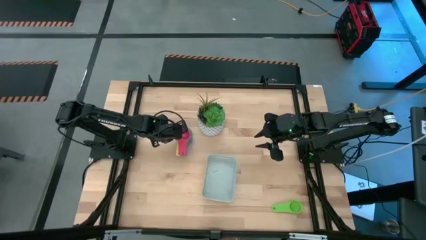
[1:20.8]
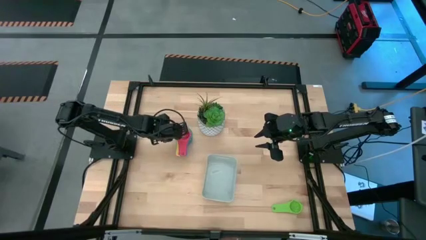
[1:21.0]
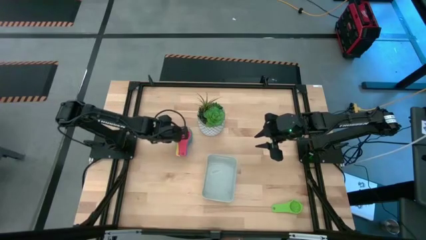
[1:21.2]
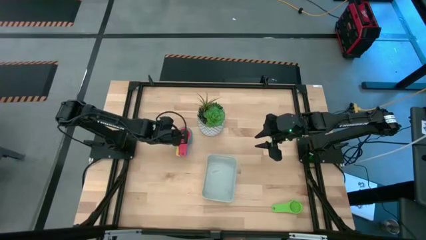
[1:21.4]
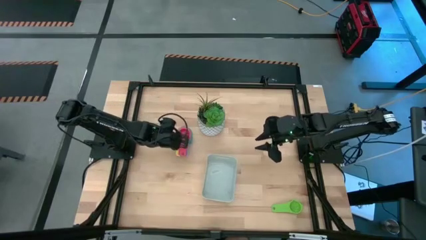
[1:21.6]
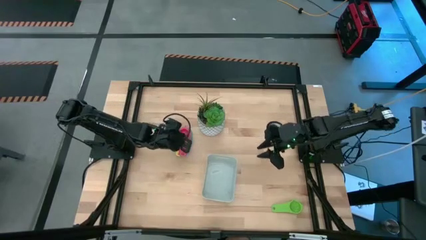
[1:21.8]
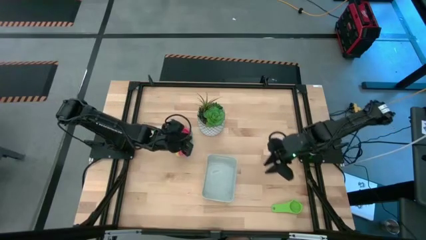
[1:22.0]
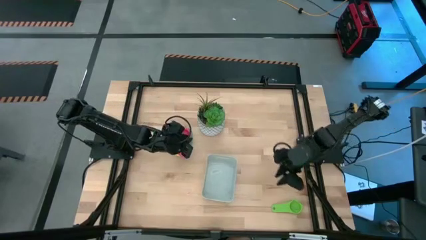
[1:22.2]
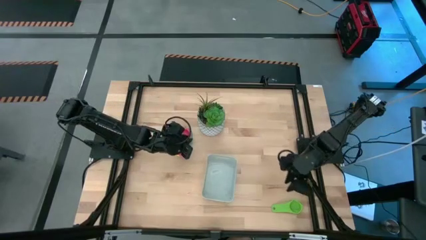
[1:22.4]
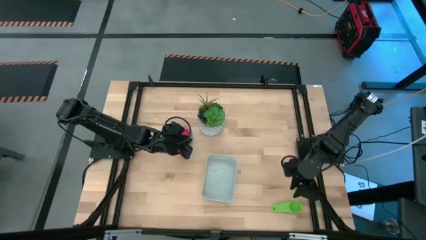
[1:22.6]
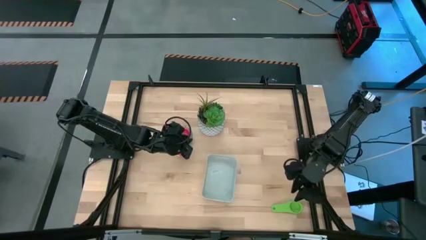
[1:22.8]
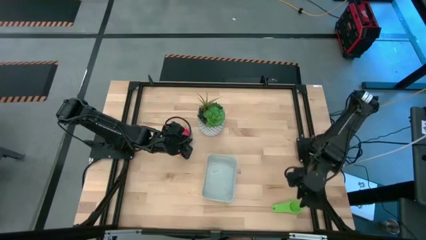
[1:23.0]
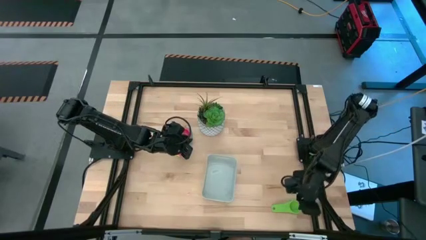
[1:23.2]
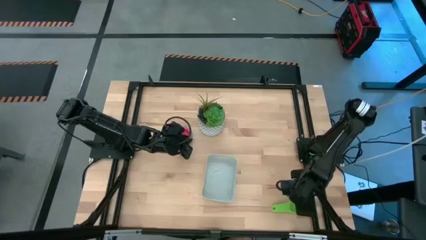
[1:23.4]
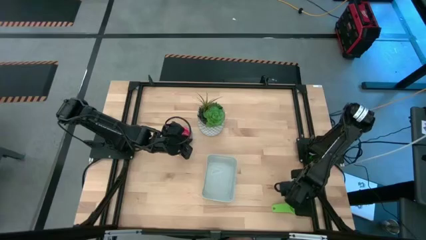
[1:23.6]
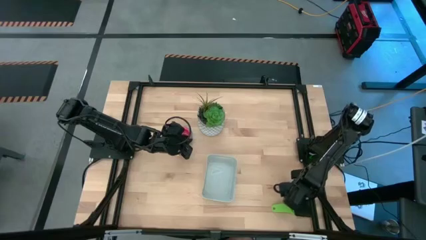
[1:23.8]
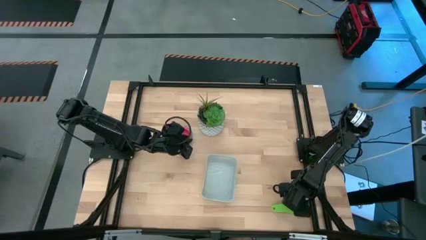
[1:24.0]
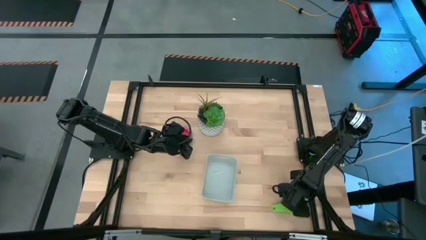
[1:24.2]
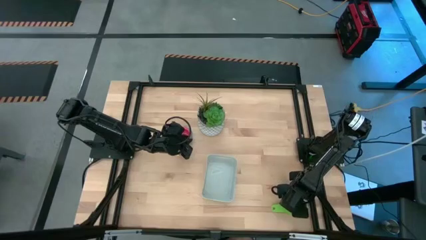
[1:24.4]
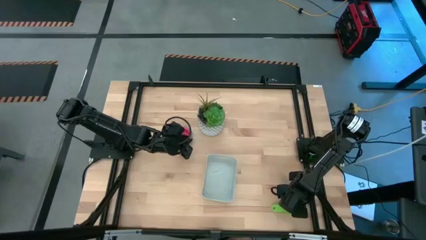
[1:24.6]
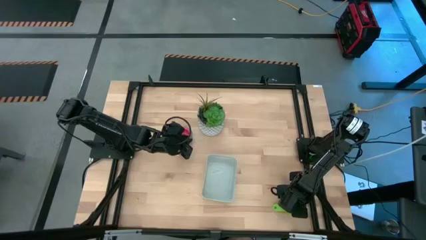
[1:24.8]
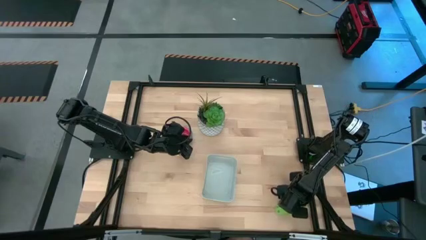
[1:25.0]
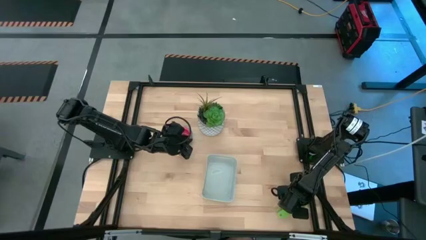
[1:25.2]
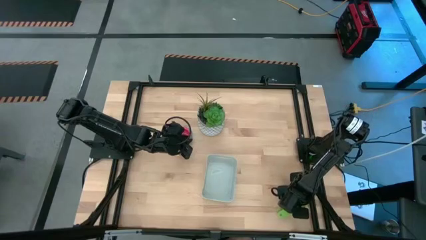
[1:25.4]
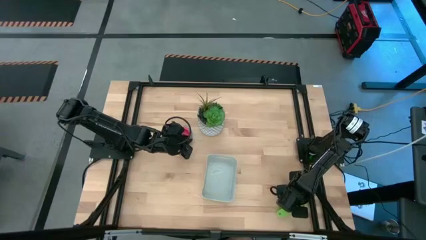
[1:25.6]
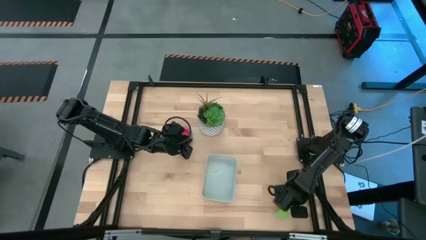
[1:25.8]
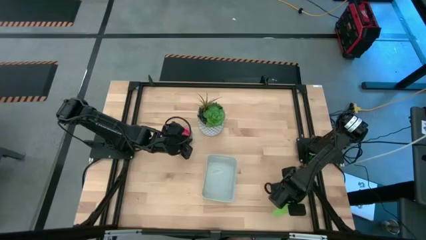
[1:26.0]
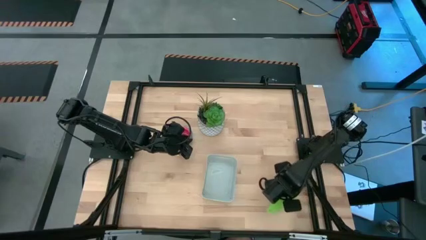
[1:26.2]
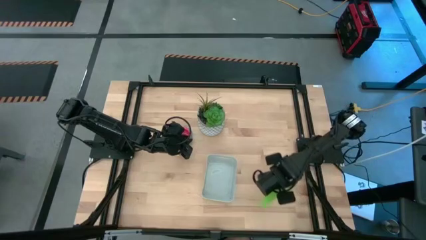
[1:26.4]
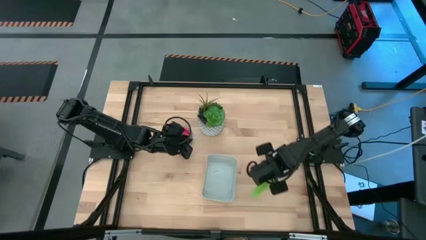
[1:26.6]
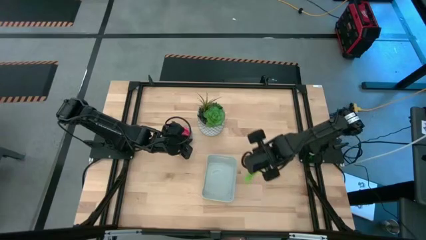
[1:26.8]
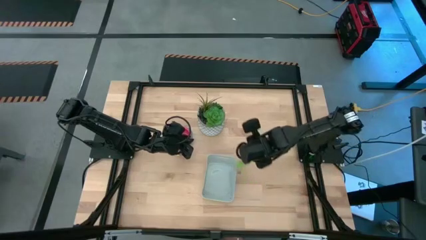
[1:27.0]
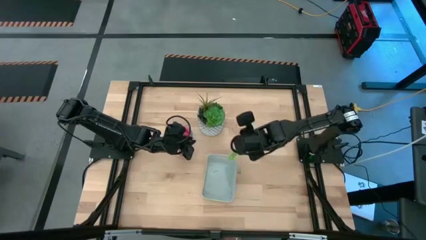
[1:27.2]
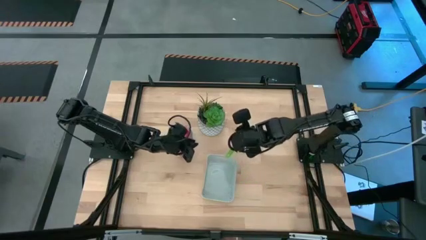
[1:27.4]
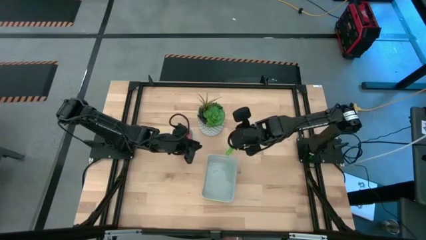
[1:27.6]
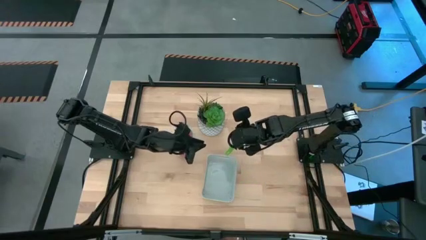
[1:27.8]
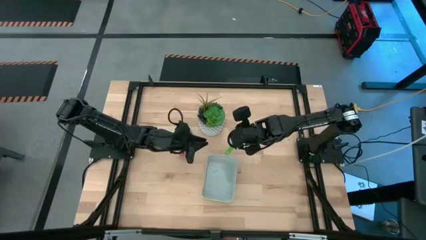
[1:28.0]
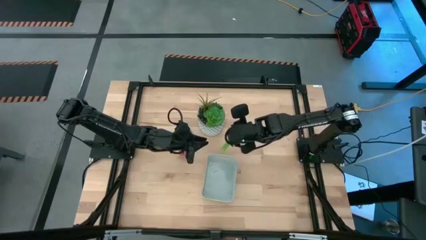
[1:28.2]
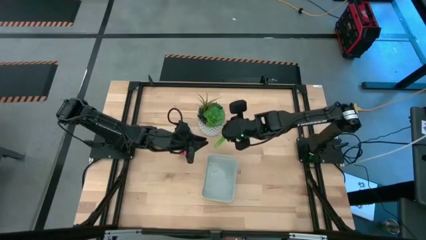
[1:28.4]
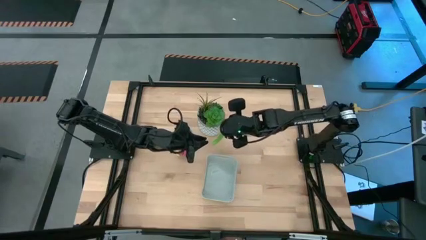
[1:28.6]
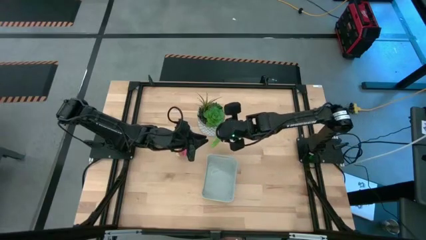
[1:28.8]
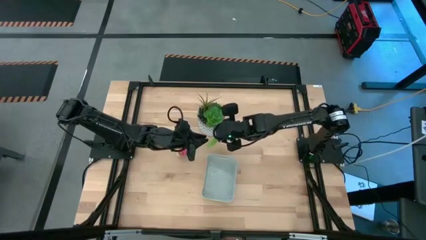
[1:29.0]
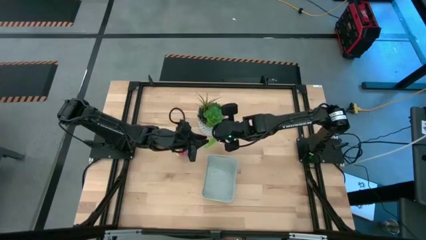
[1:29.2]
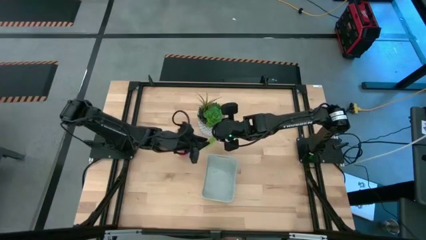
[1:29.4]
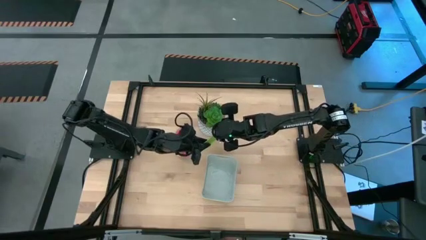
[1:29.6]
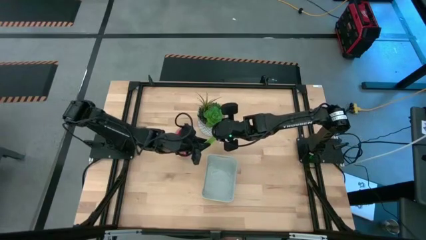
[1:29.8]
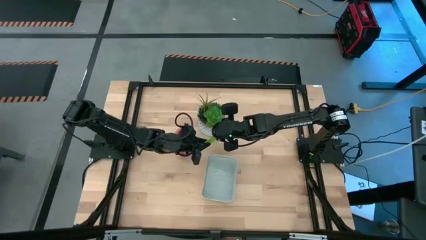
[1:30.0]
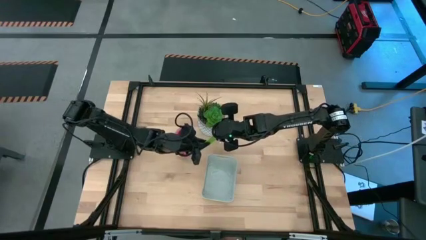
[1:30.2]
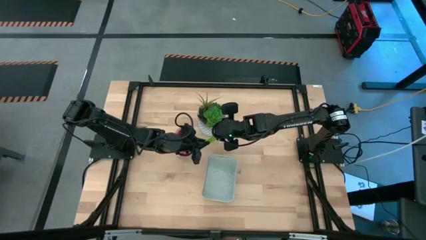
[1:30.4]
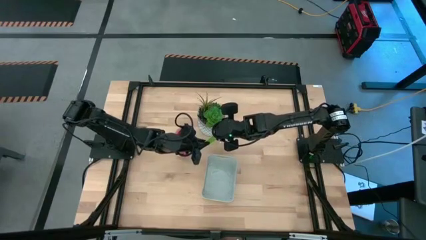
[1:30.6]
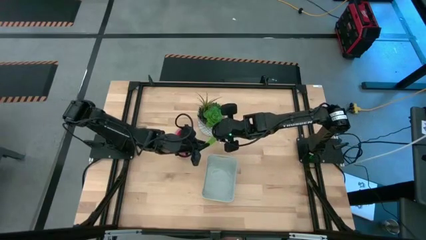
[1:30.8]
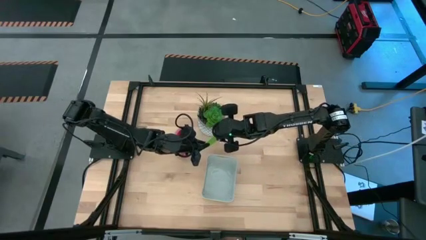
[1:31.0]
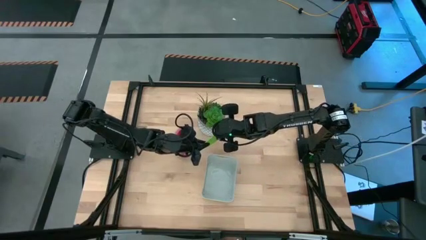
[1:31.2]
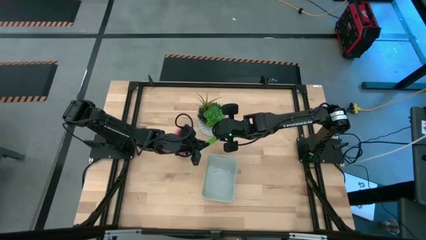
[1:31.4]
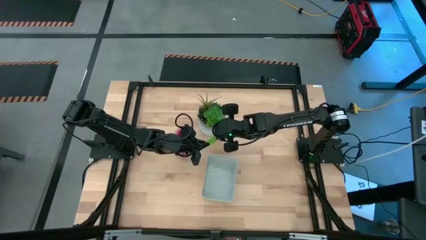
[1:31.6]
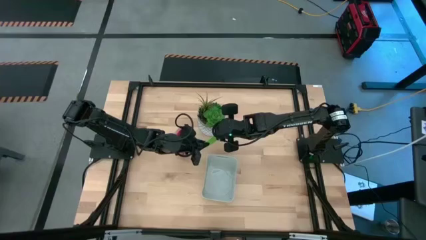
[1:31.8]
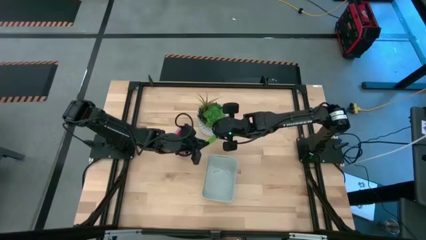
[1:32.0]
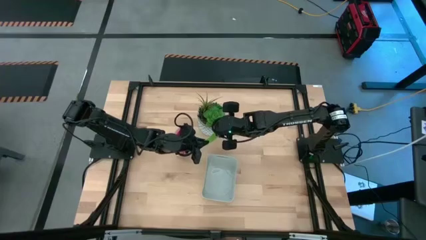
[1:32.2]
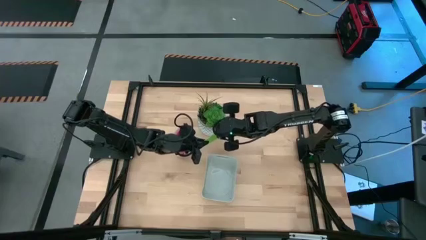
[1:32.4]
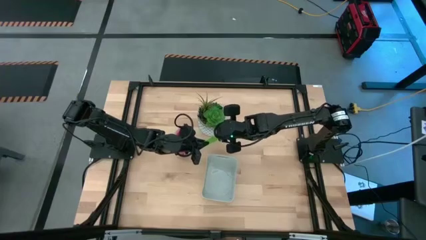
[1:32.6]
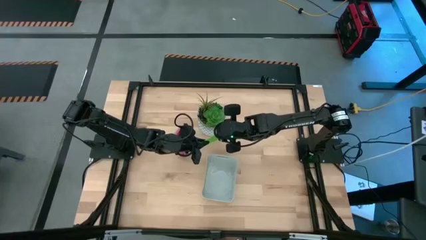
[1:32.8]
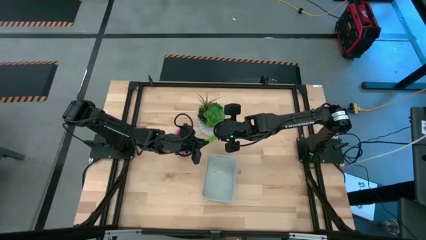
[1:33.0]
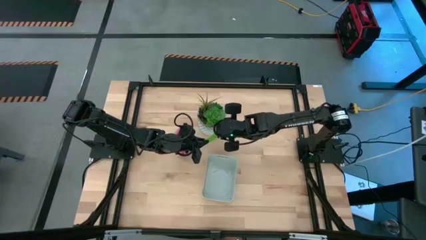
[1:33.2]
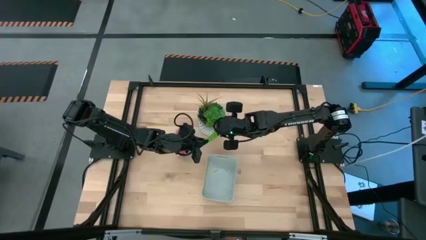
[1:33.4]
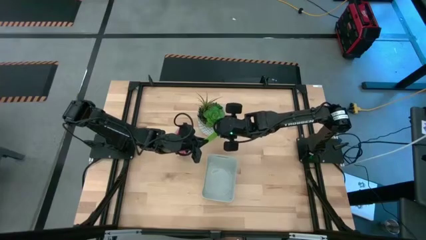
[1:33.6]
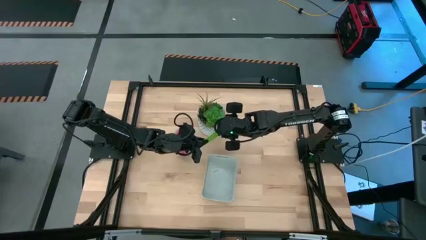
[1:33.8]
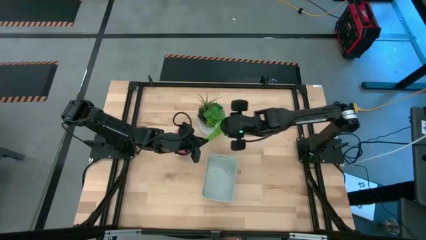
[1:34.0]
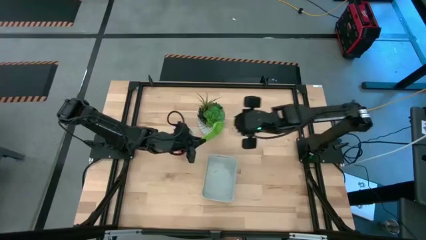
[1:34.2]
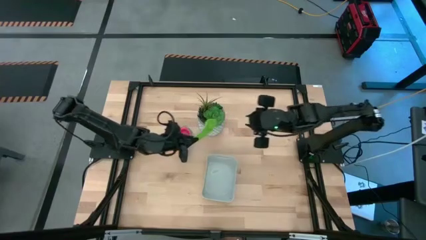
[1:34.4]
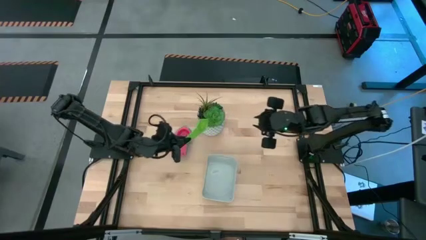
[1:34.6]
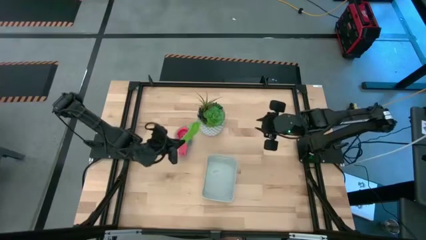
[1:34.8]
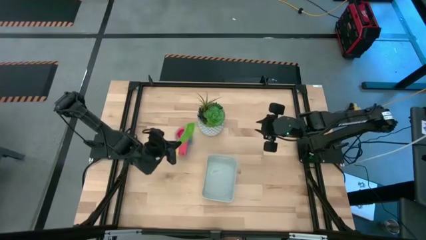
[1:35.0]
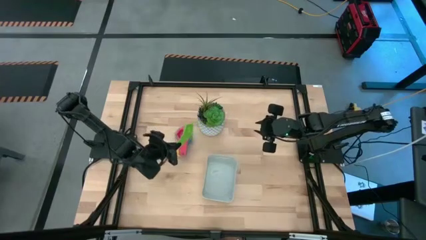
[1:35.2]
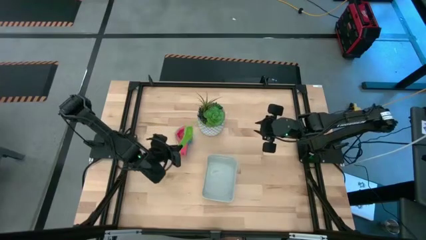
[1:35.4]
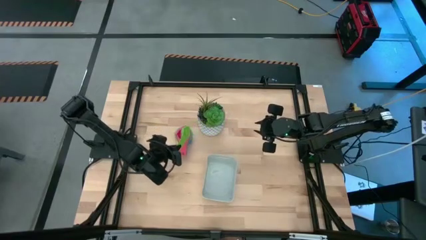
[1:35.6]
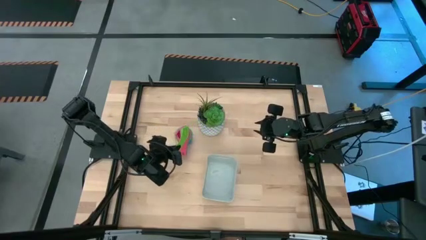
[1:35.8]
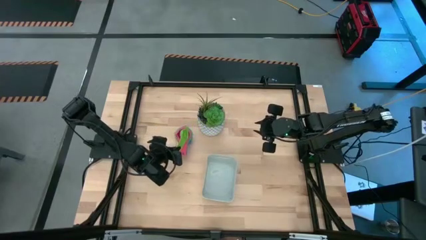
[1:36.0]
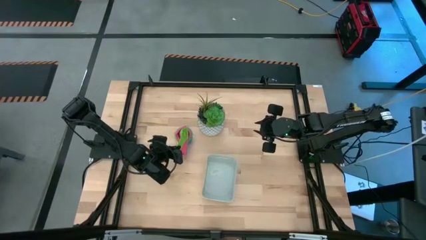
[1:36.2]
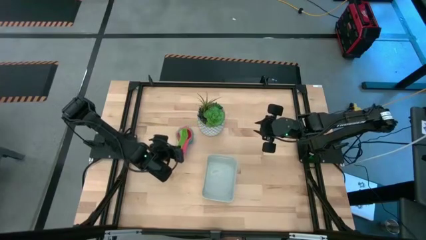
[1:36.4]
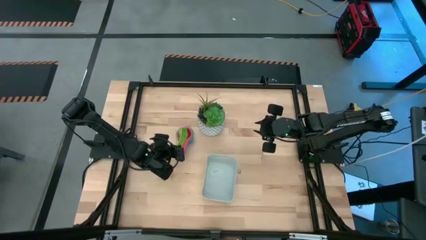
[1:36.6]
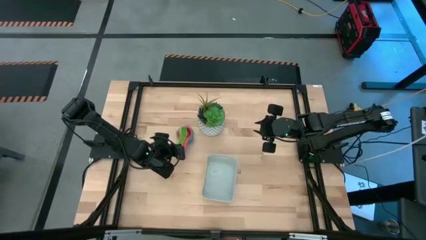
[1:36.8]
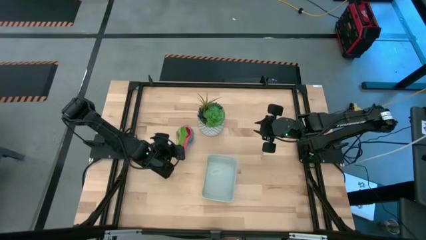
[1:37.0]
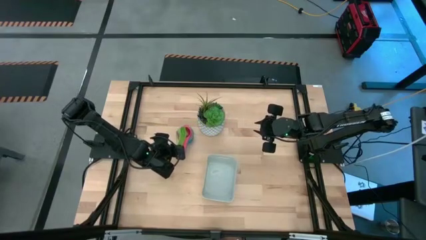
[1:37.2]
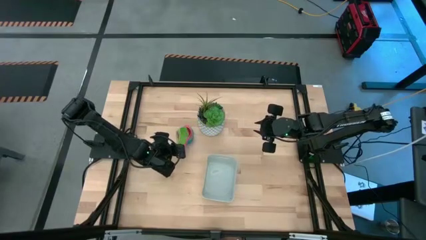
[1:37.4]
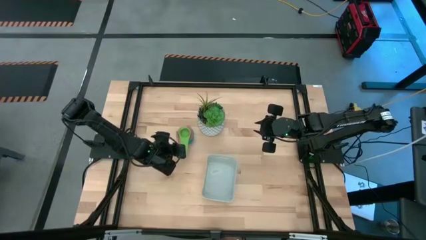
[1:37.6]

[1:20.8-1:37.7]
Task: Nest measuring cups in basket
Stack the green measuring cup on top of the pink measuring cup

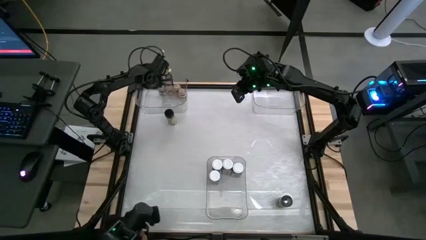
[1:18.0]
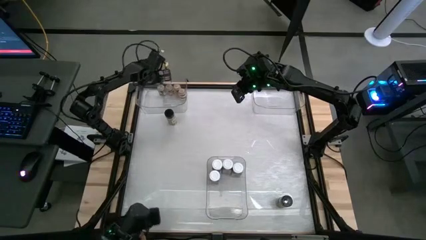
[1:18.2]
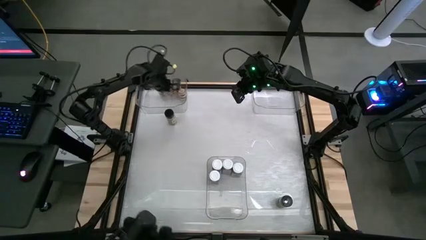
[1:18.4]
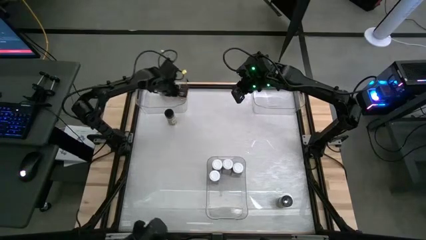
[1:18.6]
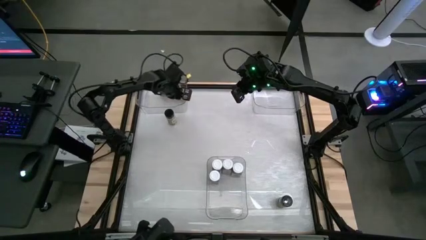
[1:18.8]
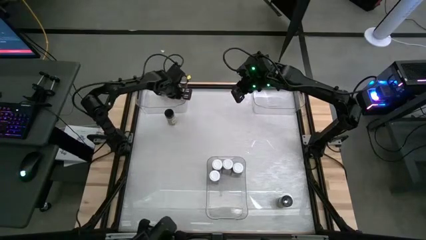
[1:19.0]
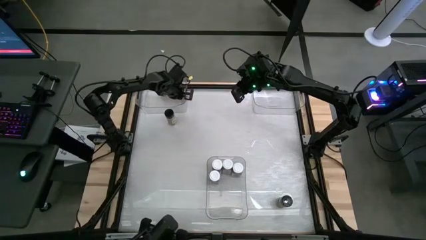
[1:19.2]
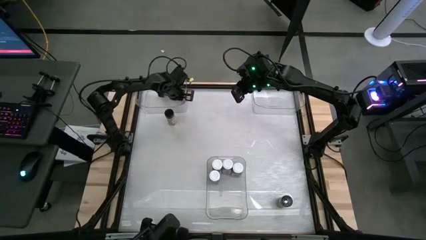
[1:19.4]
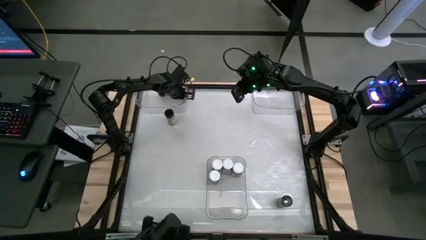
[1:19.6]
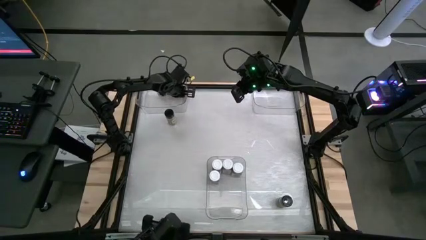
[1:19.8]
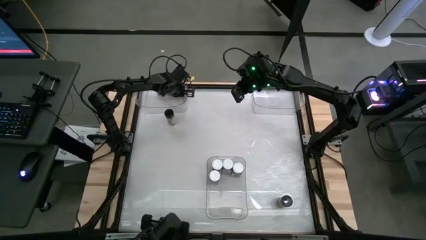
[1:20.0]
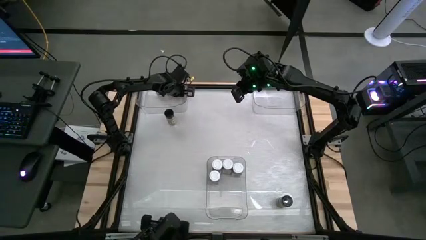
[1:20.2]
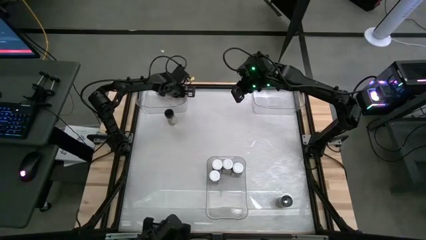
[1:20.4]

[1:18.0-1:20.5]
Task: Sort spices by type
Adjust the brown seasoning bottle
